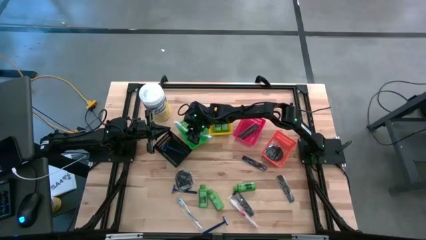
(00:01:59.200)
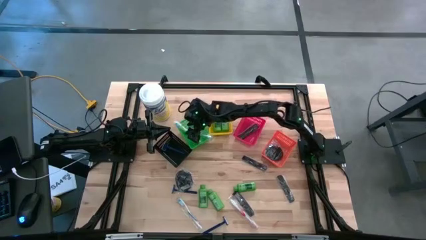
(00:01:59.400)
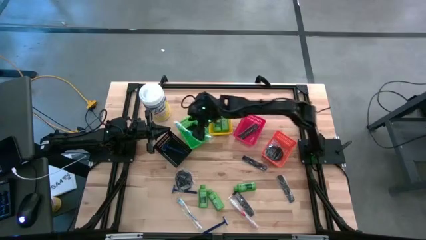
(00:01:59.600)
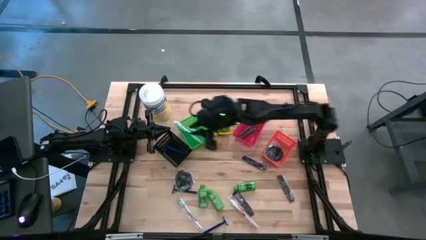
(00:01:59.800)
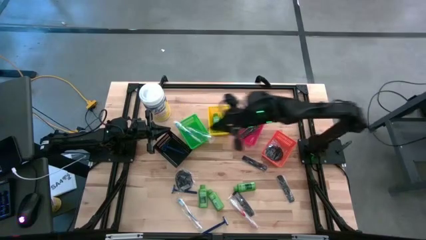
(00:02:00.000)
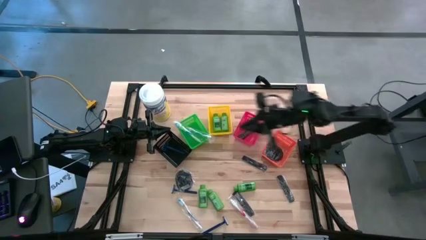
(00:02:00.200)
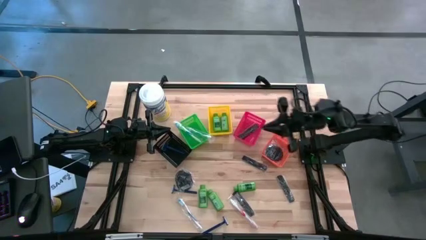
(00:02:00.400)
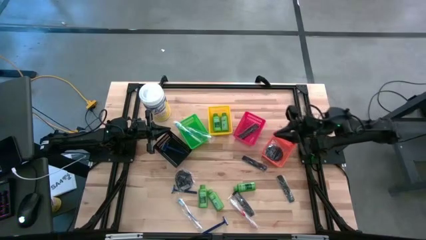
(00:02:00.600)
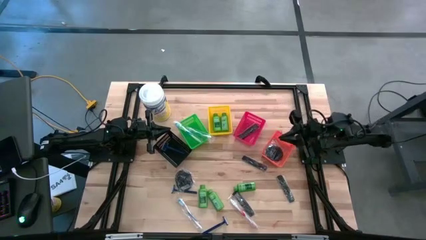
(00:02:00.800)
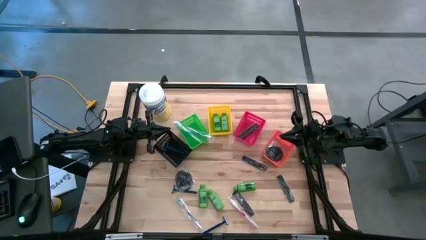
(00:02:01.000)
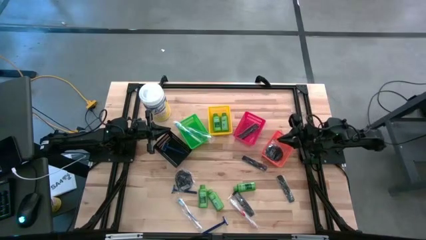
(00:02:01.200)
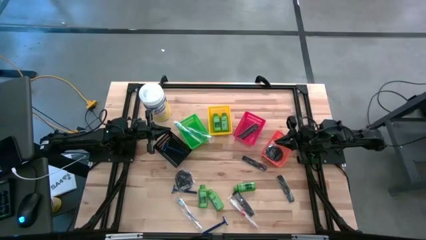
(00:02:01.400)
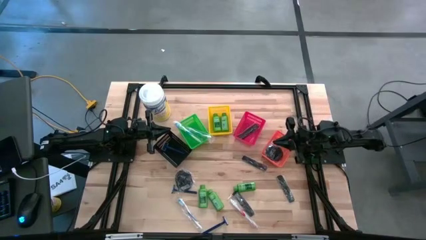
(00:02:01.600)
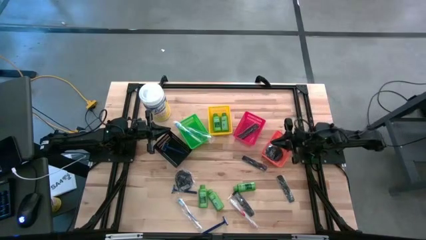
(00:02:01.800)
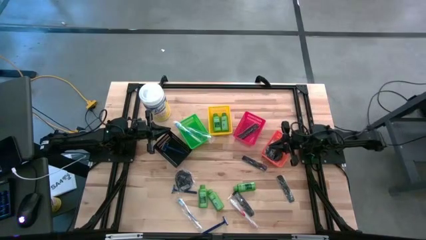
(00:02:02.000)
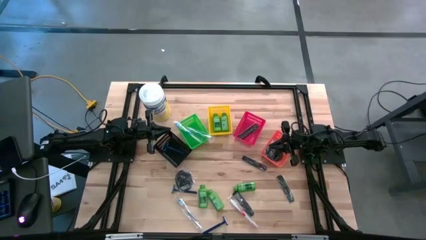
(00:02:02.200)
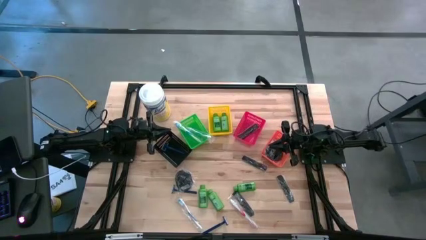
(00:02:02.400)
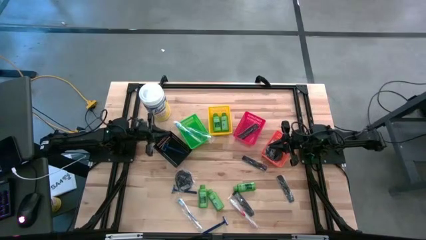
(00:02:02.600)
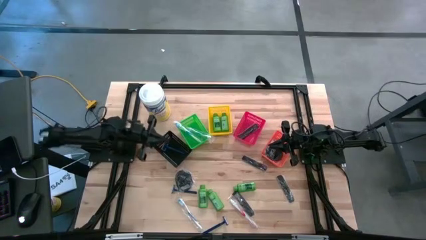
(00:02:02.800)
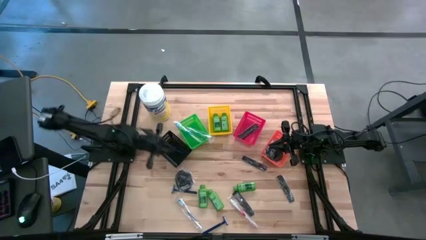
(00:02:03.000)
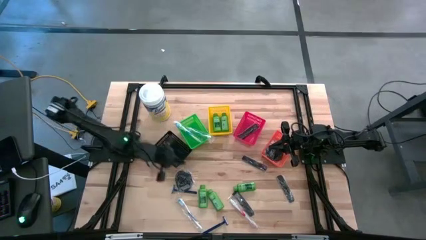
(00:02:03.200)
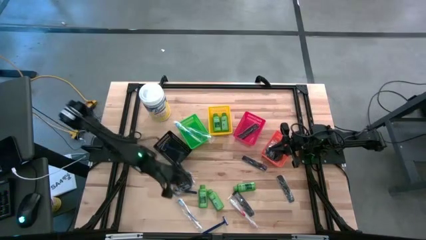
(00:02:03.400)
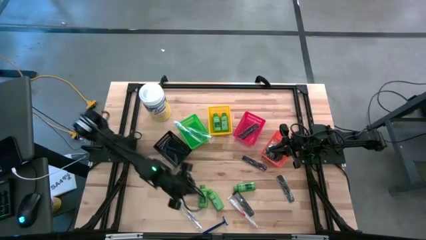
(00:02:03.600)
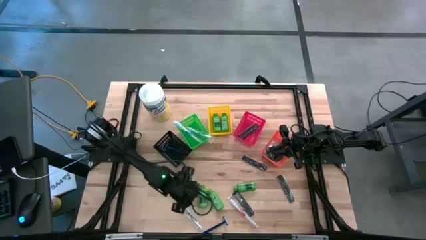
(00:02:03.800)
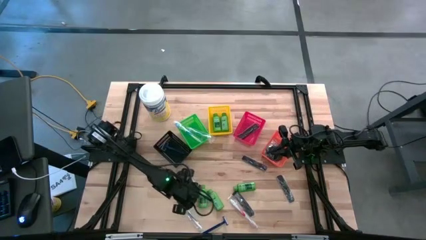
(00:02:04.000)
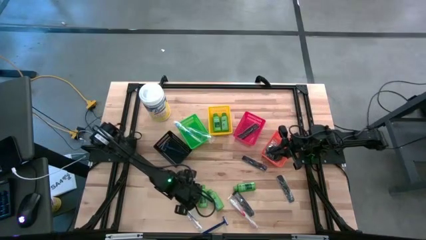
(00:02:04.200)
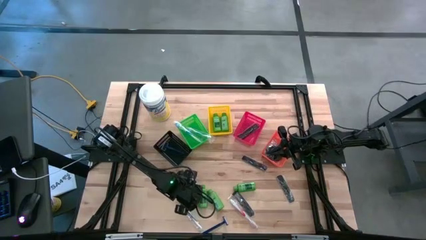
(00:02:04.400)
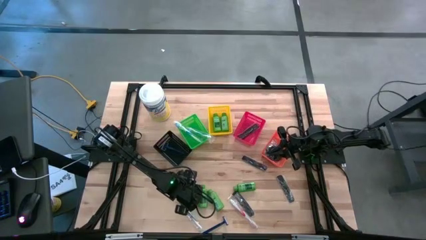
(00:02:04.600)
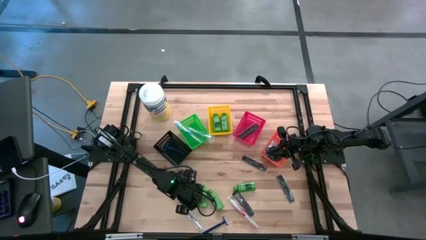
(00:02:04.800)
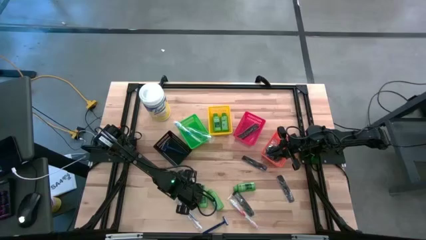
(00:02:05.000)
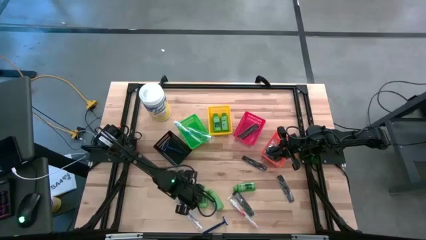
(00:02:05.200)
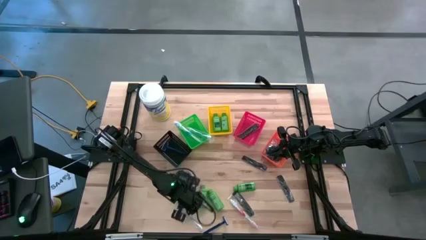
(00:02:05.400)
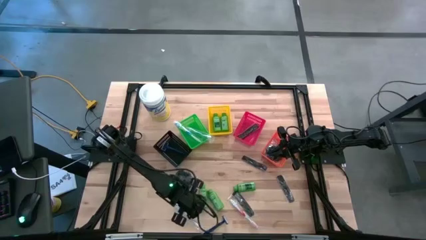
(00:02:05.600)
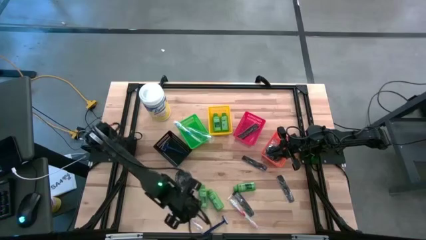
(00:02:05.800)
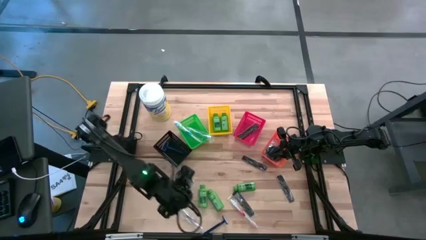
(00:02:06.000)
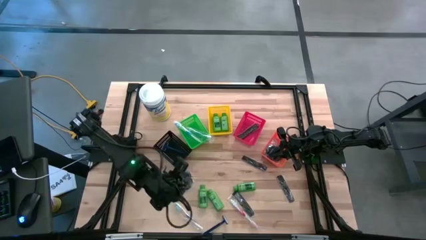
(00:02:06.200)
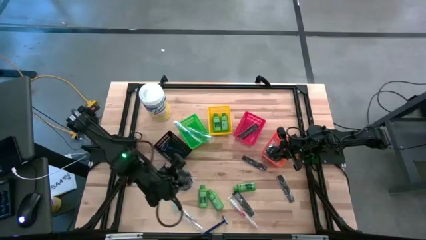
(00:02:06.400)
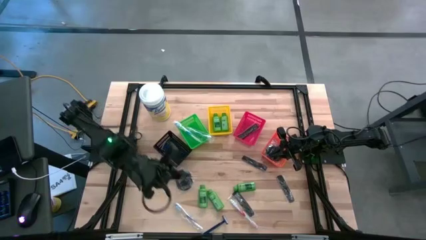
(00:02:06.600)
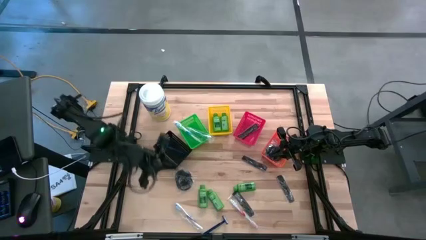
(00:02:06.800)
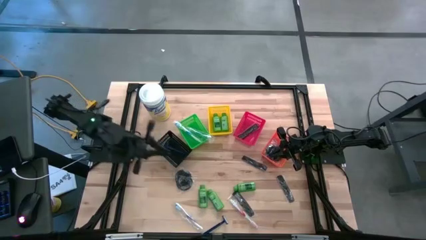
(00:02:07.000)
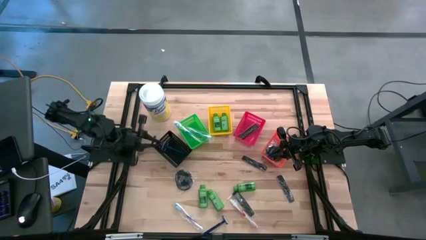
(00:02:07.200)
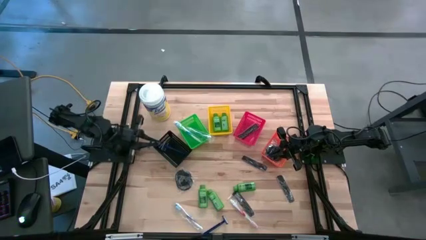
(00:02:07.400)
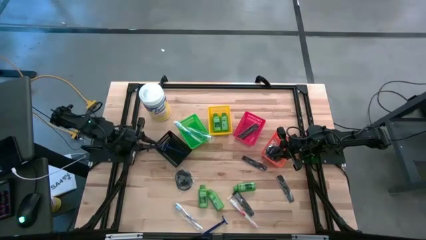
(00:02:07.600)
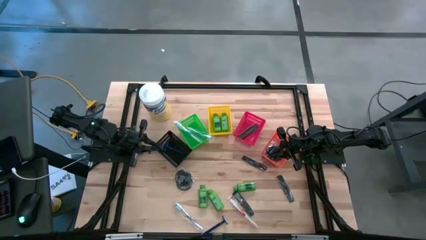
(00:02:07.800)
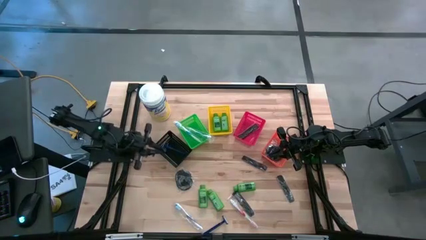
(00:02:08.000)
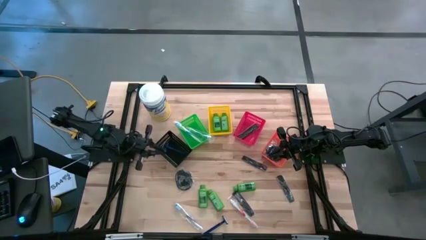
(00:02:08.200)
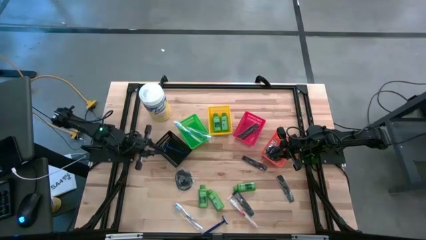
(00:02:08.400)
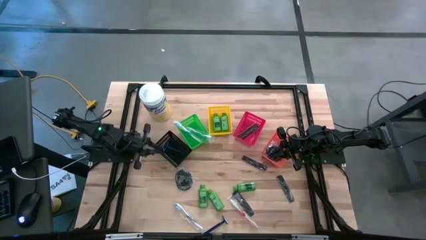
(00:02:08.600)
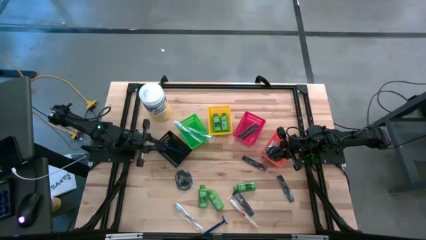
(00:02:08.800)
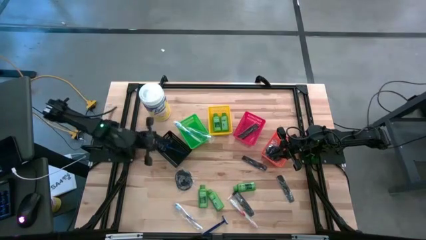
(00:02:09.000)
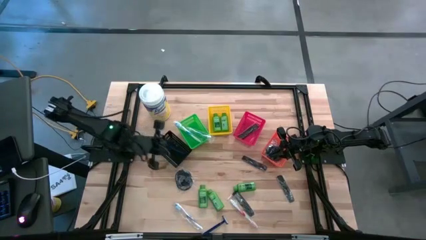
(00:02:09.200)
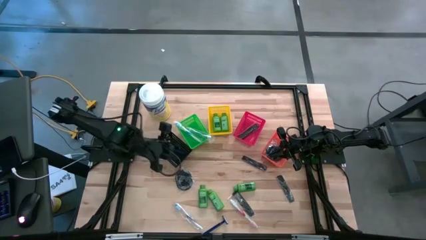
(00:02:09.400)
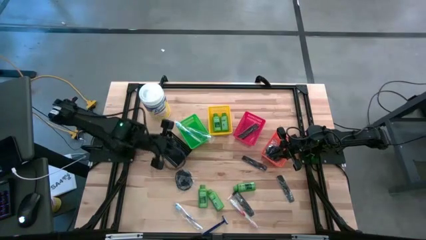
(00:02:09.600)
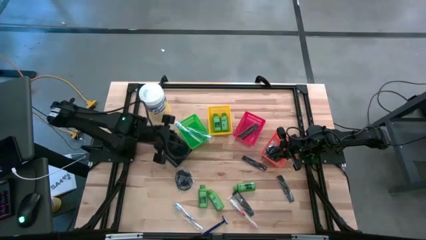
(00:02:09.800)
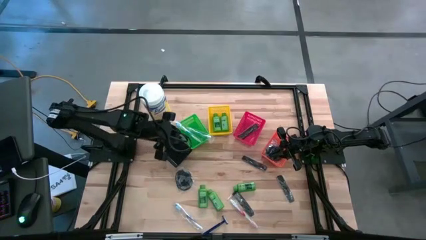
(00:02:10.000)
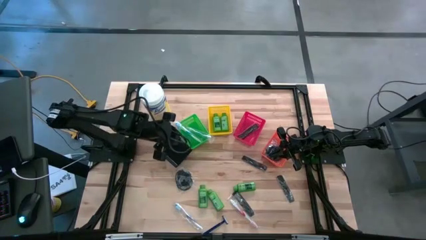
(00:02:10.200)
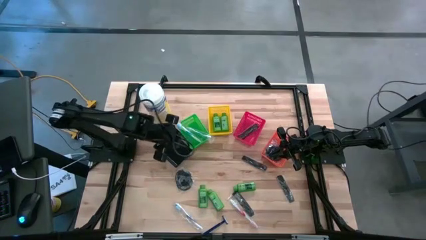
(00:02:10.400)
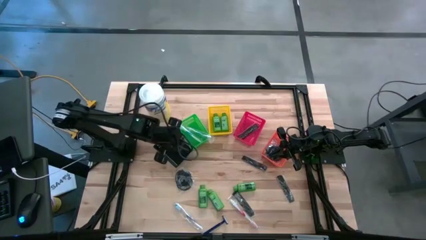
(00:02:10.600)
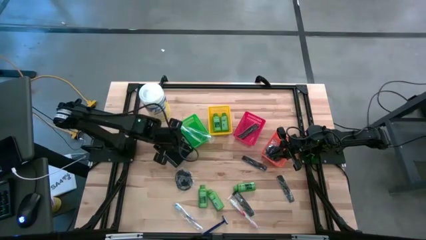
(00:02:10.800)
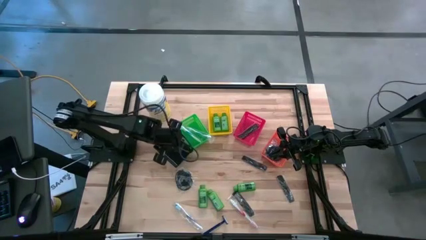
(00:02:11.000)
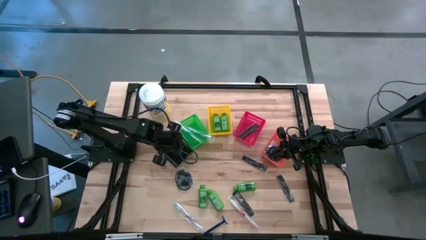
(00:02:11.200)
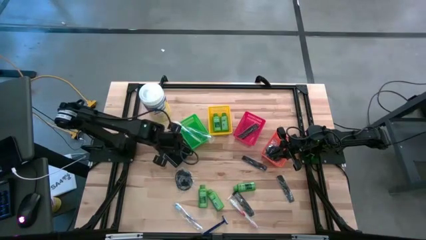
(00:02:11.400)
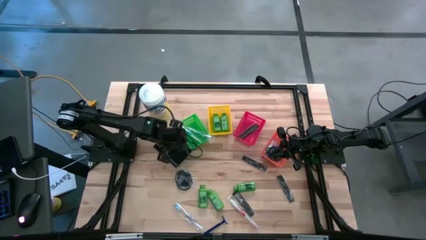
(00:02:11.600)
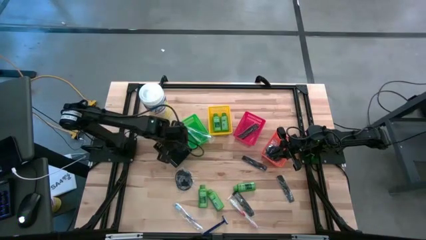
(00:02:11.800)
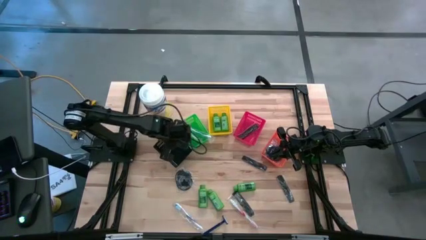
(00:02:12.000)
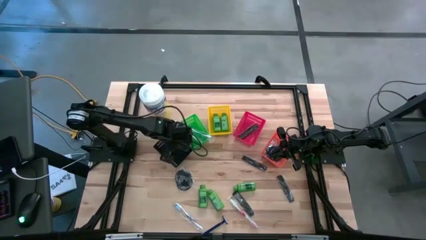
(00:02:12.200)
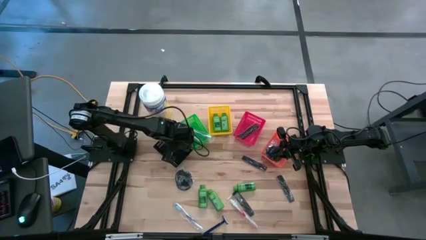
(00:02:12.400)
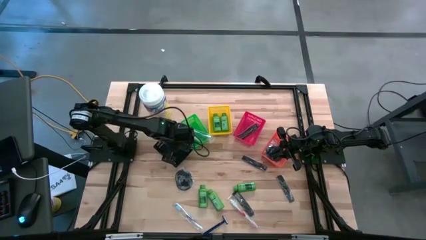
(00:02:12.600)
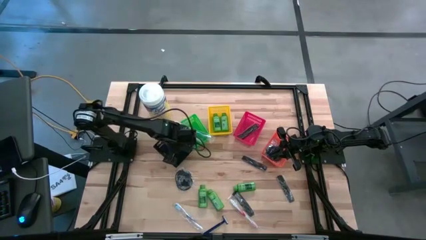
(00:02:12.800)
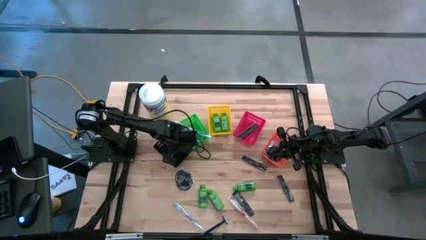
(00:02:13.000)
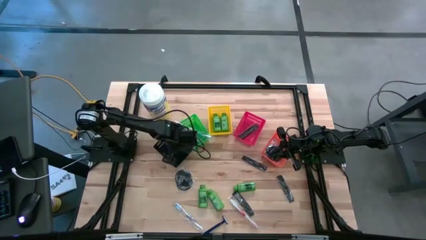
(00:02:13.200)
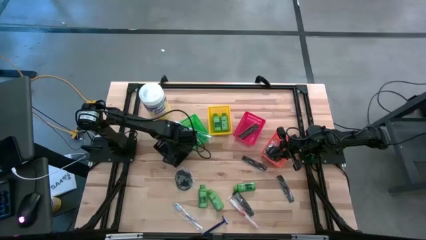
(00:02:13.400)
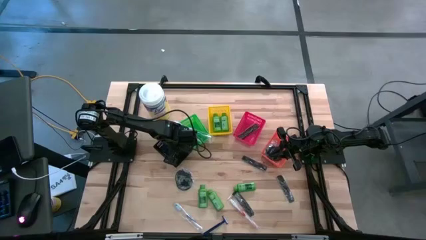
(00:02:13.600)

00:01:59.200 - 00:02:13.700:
Task: Pick & Place Travel size toiletries
Put the blue razor into the black bin
